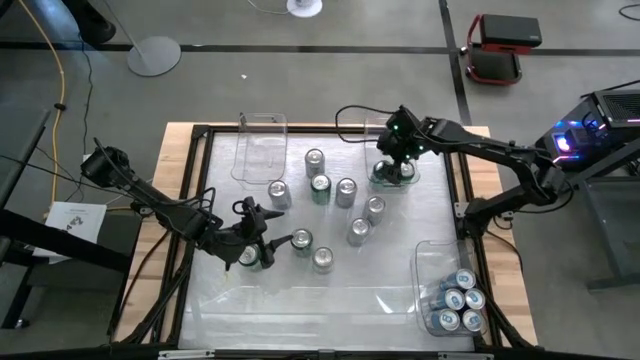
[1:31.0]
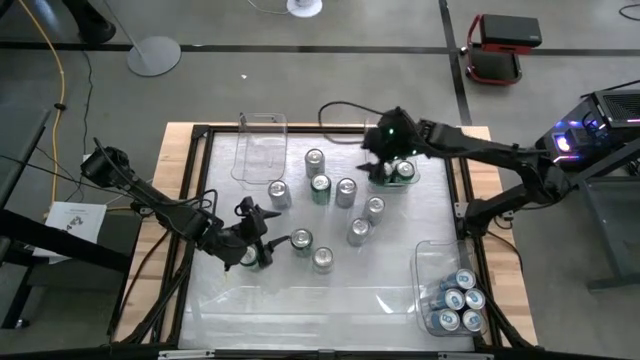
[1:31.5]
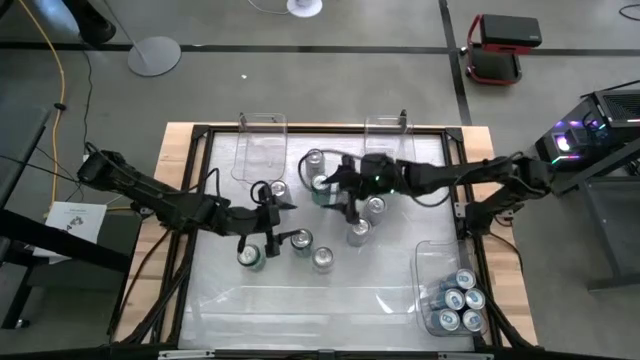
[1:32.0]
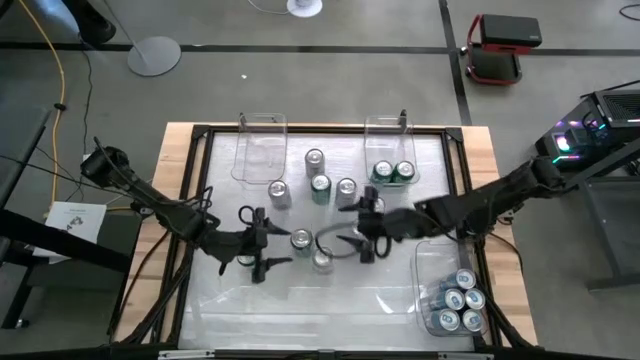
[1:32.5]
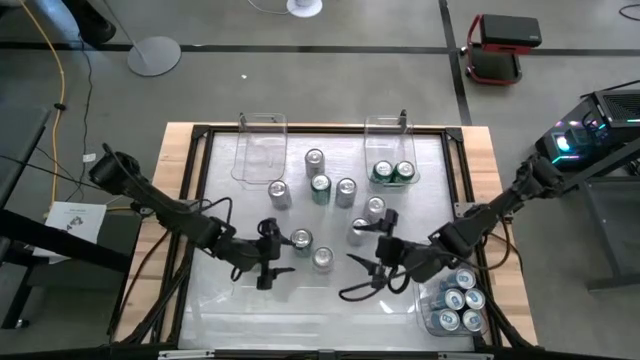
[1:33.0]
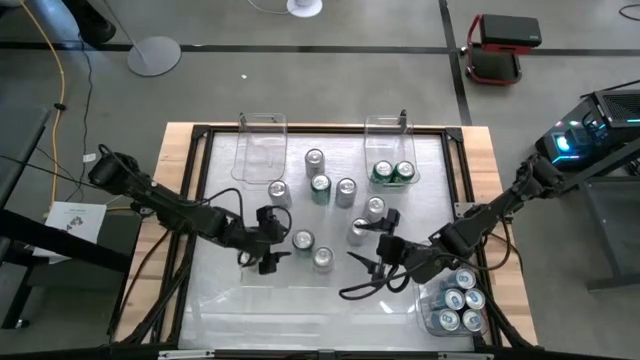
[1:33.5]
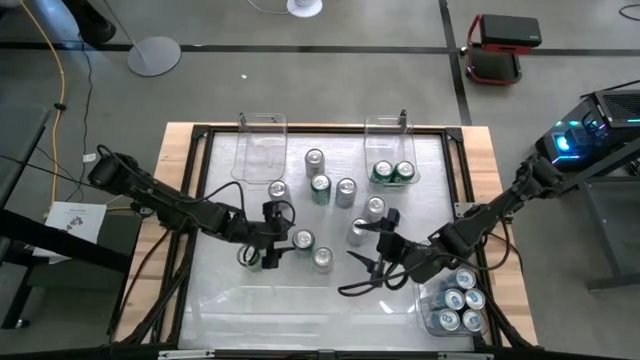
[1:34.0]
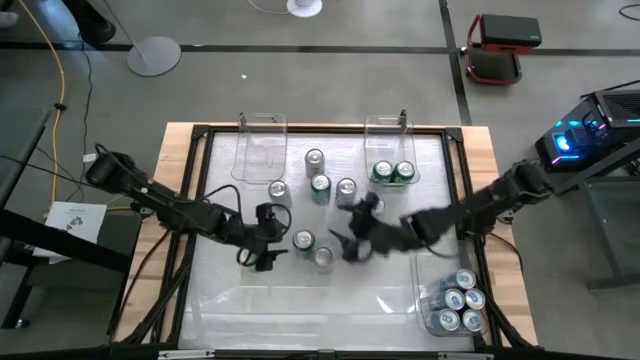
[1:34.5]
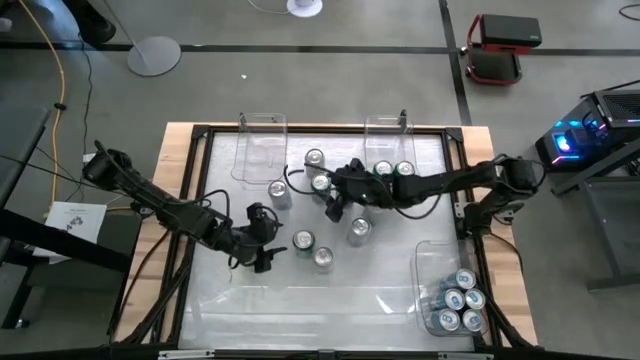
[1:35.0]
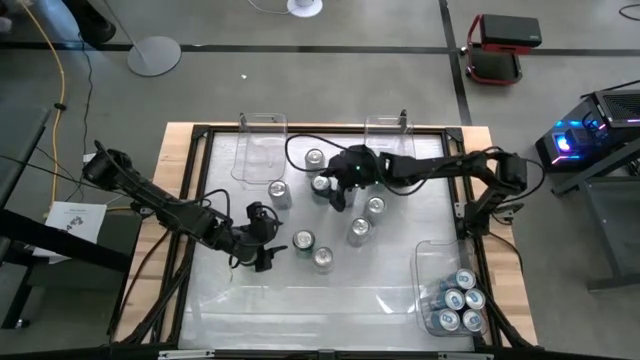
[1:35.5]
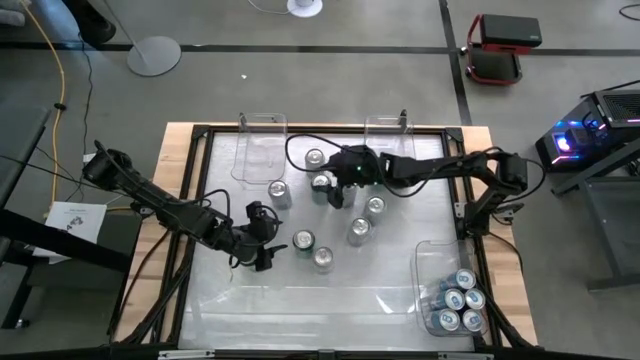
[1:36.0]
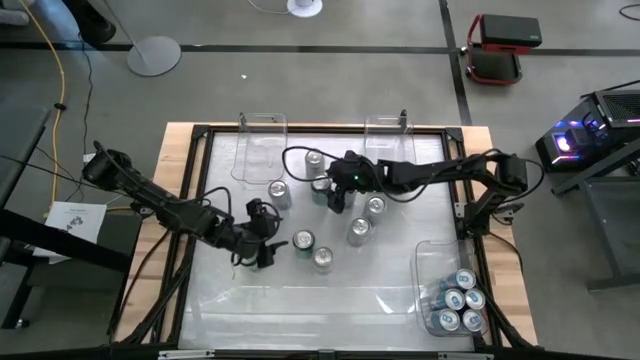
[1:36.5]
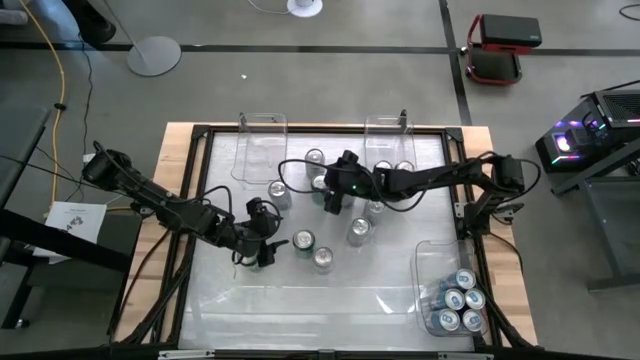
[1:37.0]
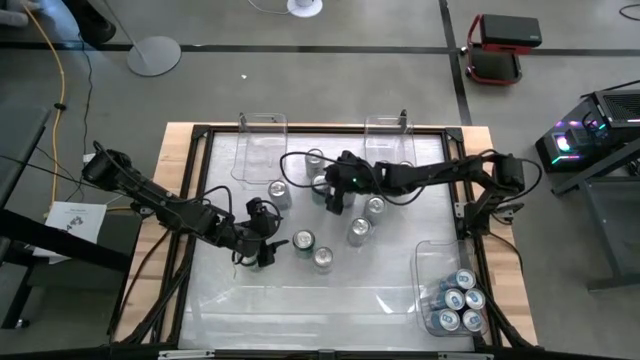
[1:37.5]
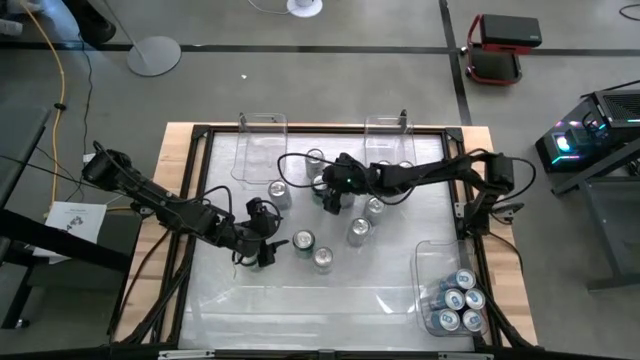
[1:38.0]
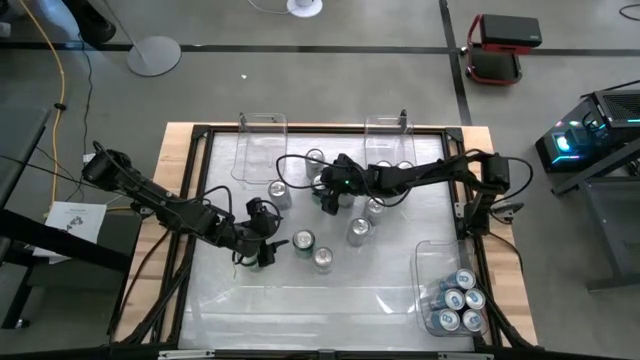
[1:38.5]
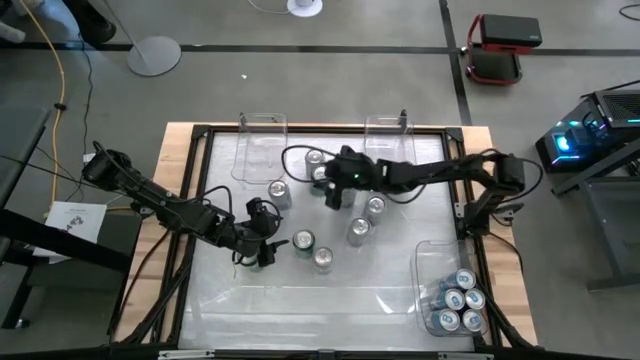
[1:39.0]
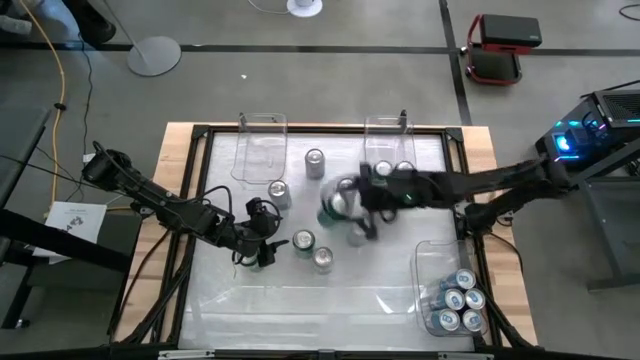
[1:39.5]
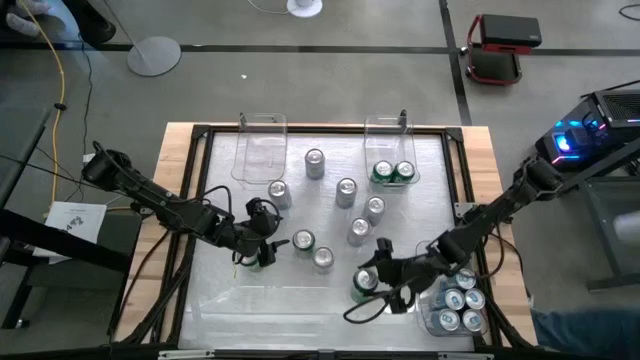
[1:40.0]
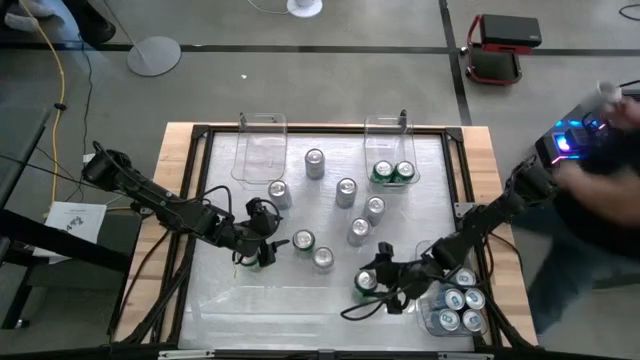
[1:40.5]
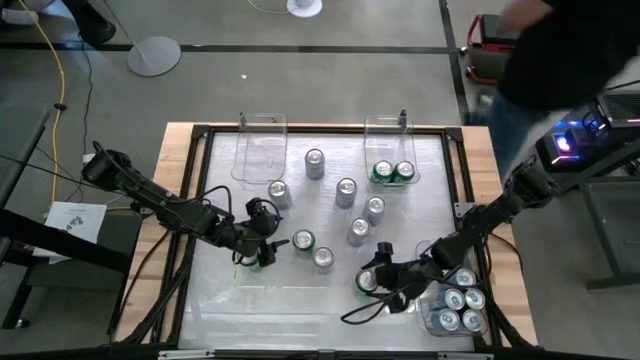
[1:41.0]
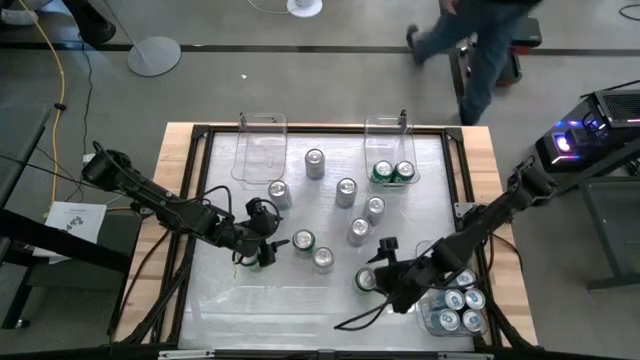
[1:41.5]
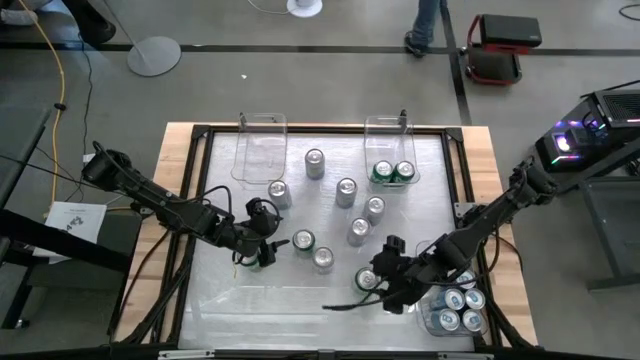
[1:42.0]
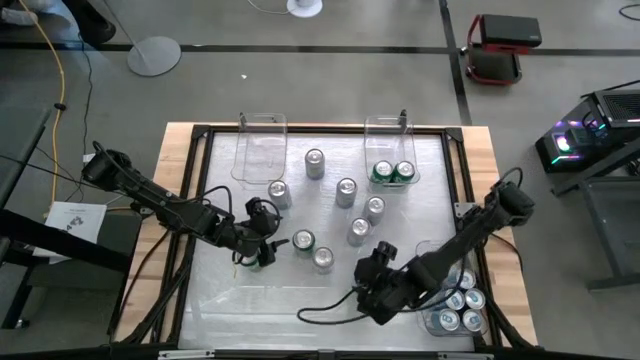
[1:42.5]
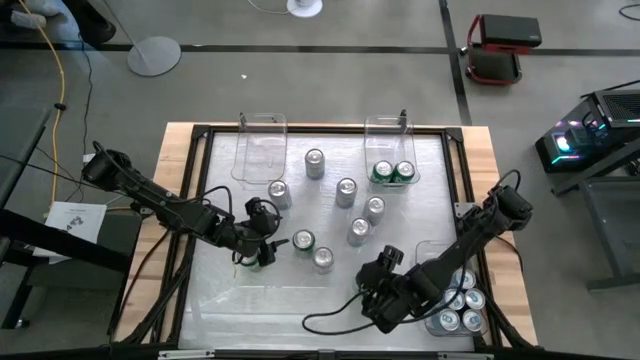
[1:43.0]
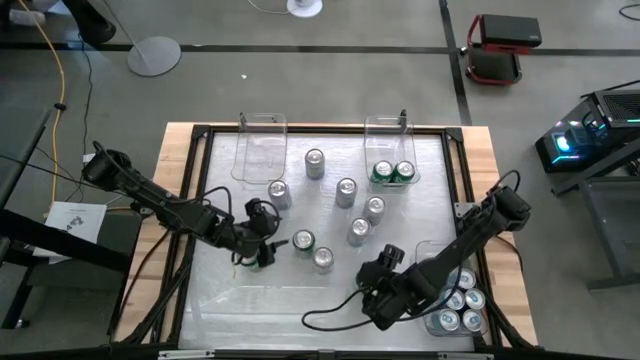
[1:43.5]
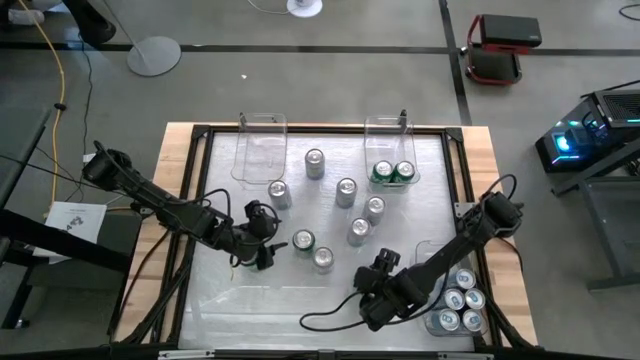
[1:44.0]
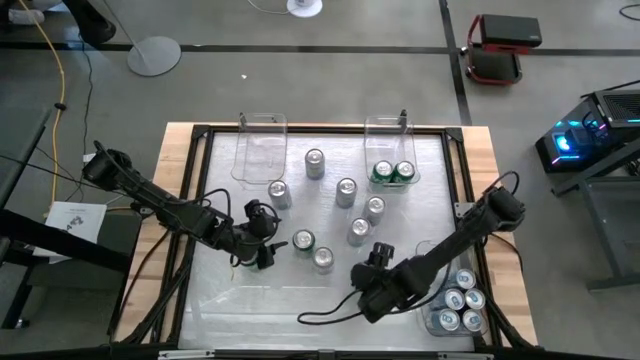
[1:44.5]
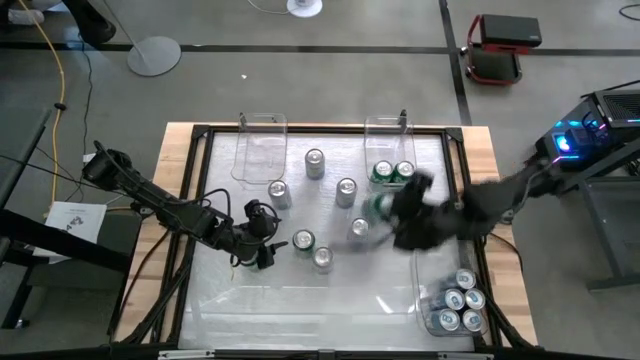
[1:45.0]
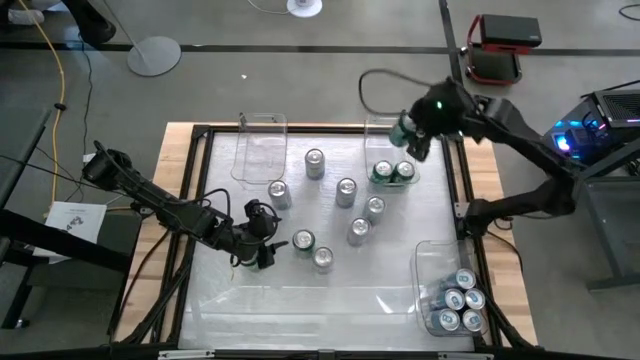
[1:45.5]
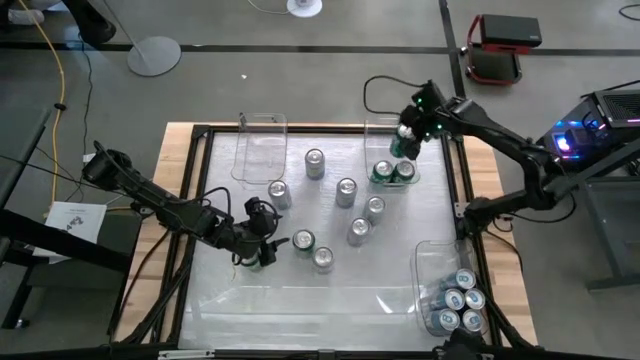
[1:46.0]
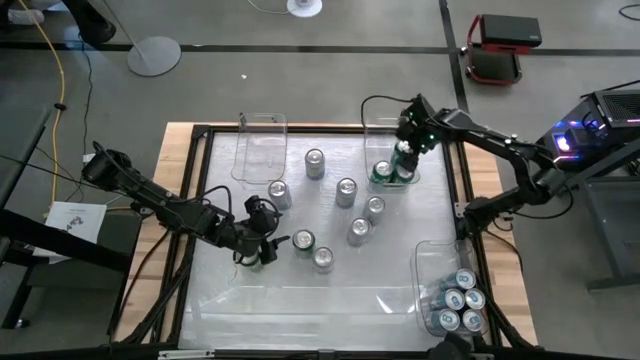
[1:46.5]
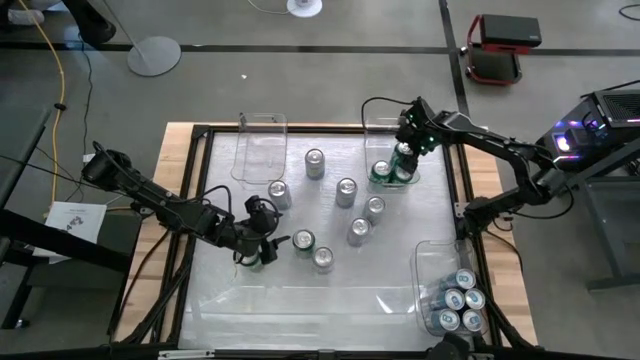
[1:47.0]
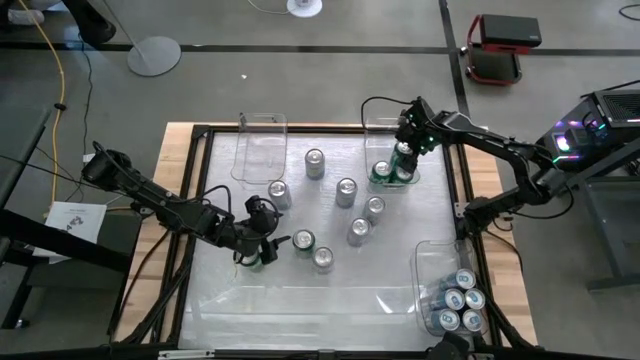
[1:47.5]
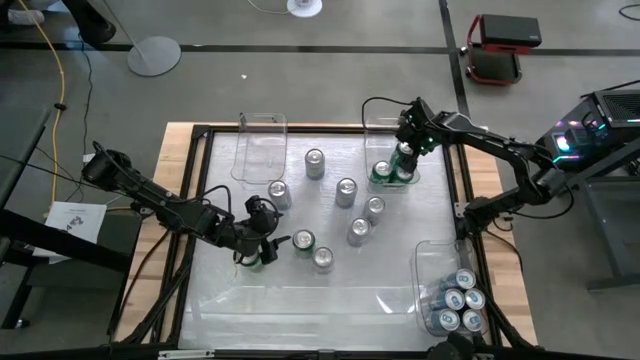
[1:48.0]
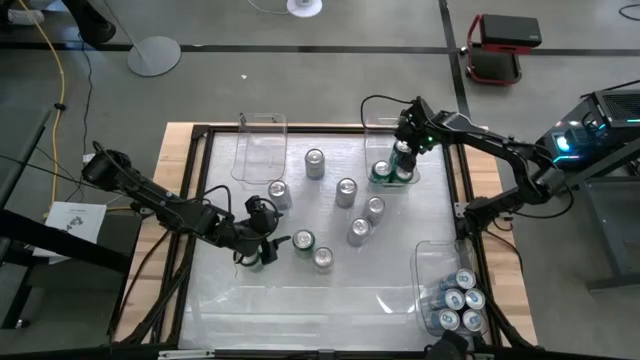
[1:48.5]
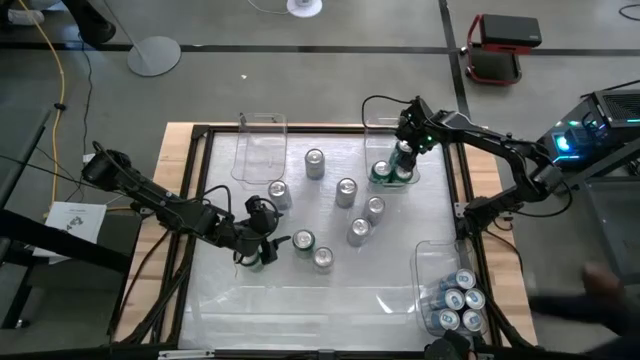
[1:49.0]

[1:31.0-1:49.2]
Task: Sort soda cans
Put the green soda can into the top right transparent bin

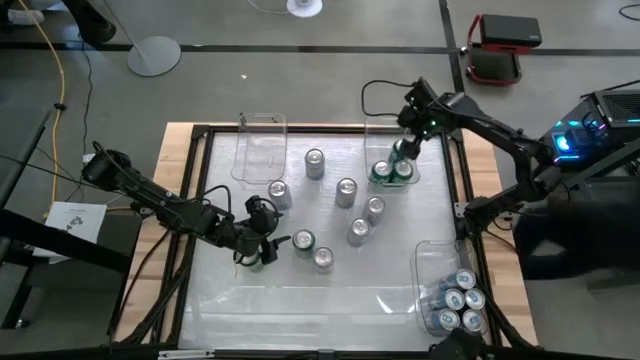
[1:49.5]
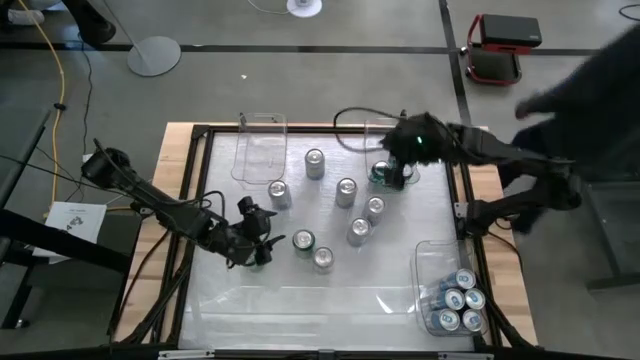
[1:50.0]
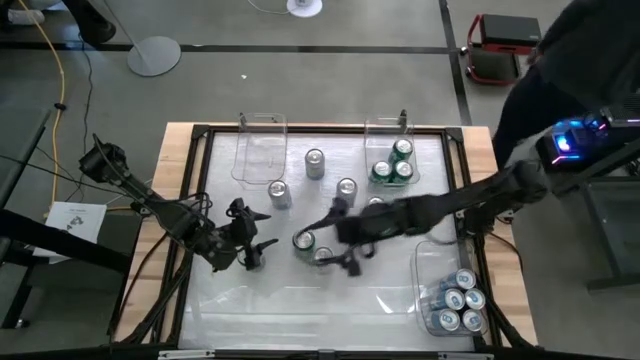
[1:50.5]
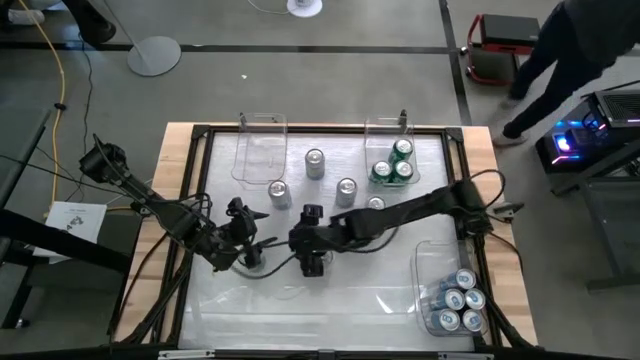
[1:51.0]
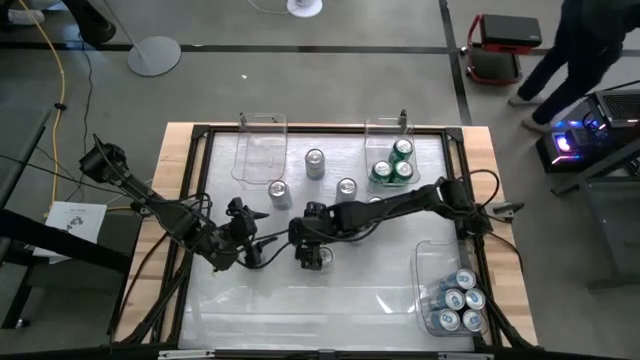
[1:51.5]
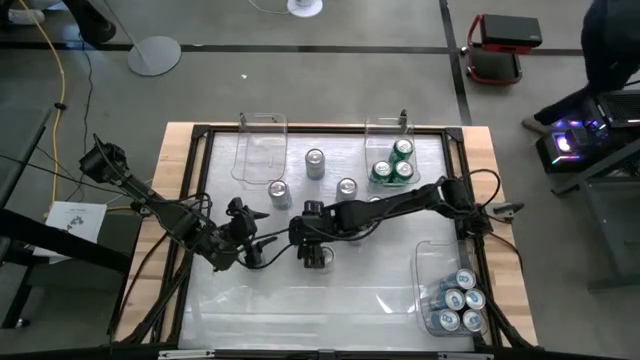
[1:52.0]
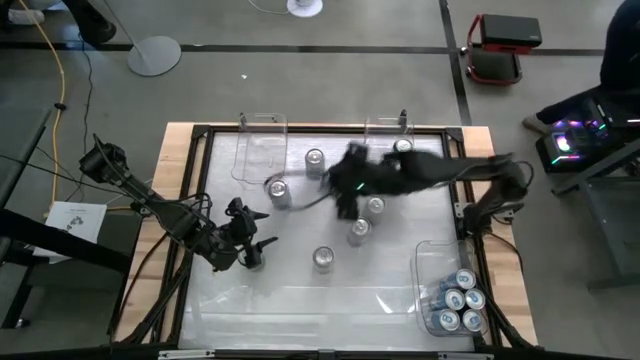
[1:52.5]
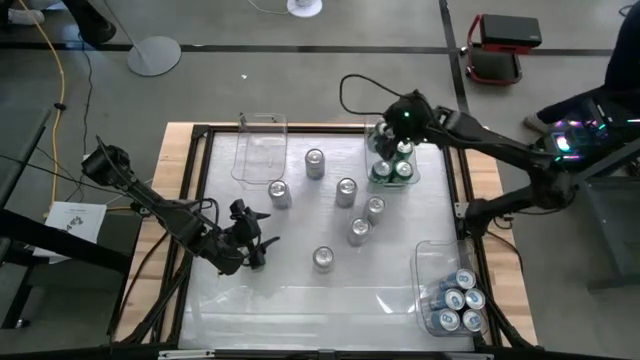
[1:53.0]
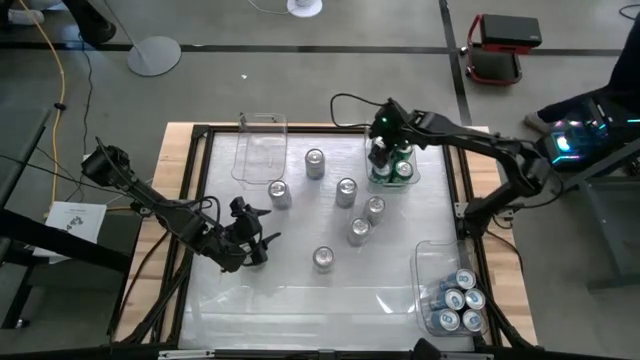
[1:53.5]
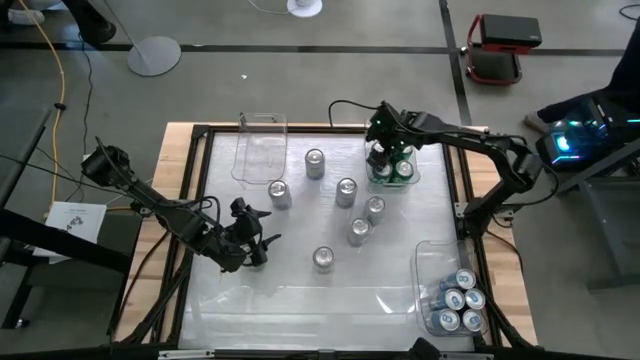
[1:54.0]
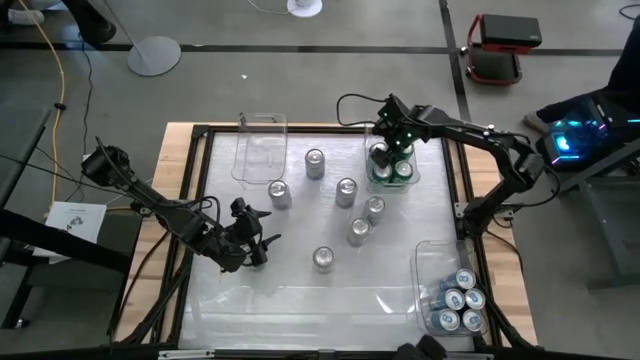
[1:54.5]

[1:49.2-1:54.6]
Put the green soda can into the top right transparent bin
